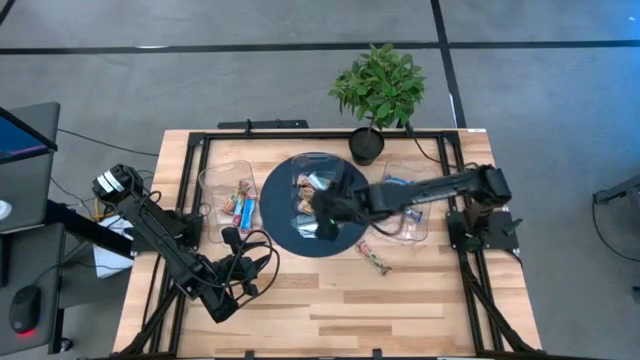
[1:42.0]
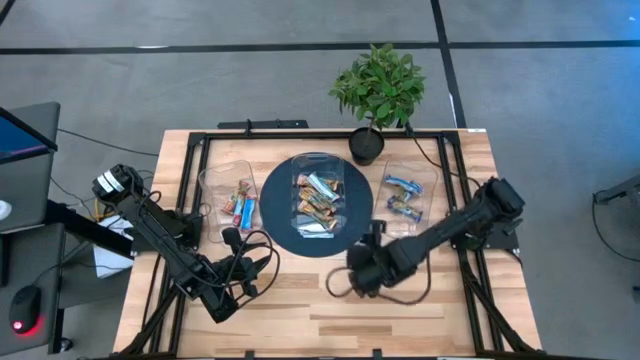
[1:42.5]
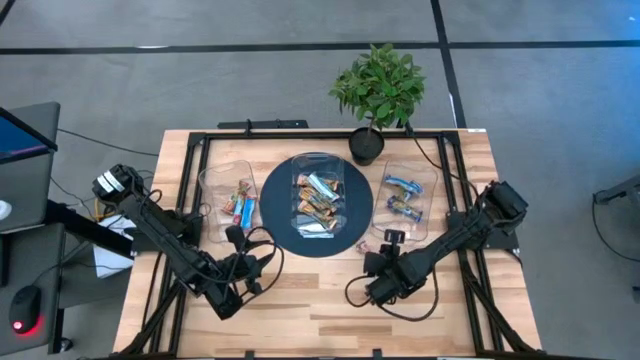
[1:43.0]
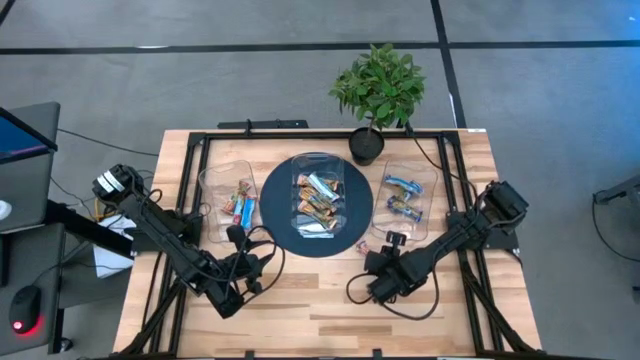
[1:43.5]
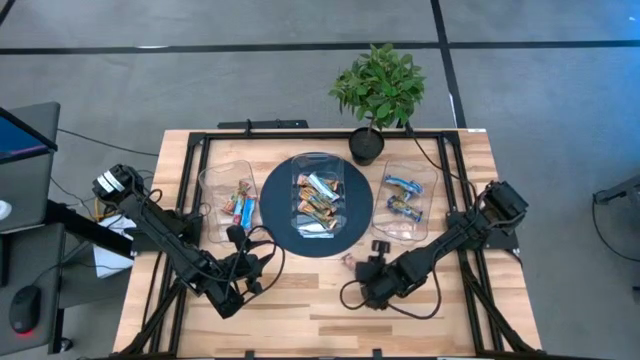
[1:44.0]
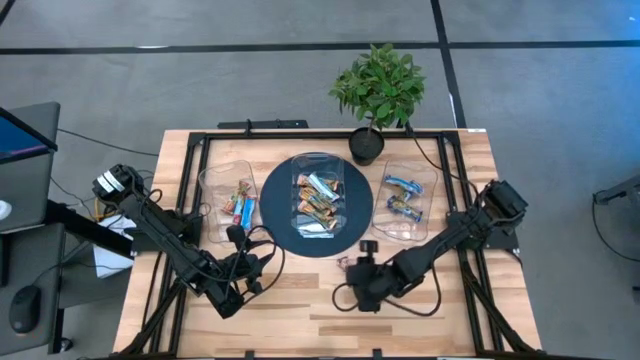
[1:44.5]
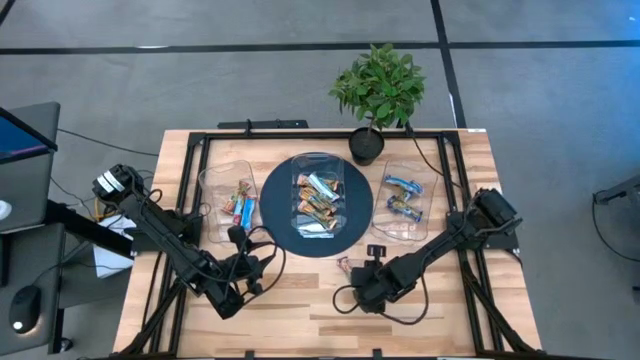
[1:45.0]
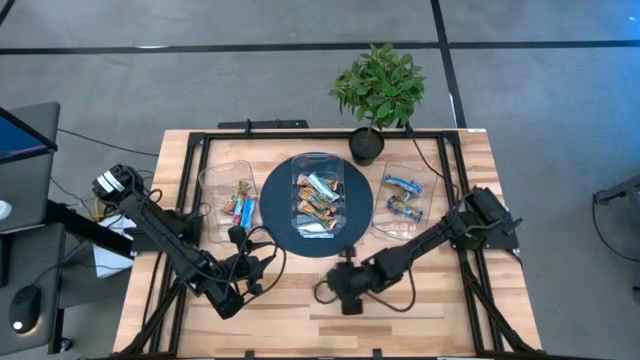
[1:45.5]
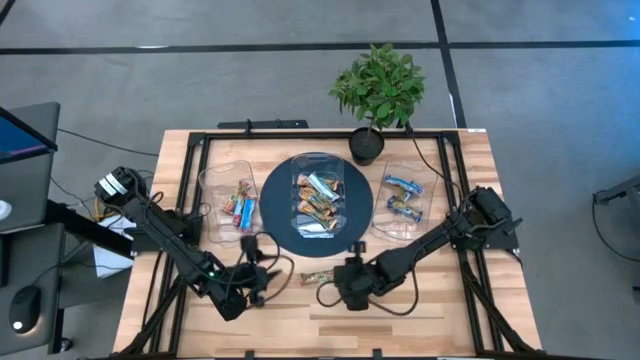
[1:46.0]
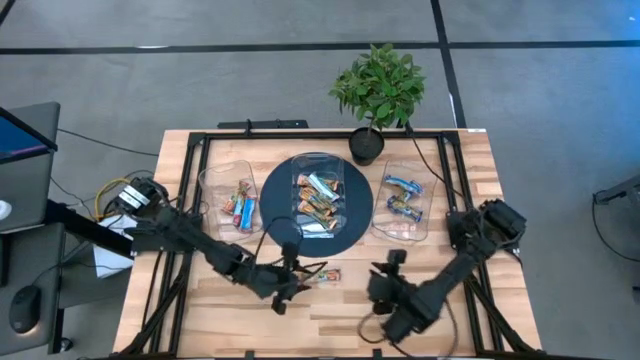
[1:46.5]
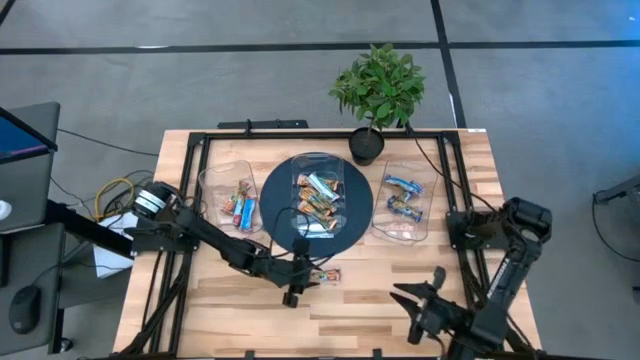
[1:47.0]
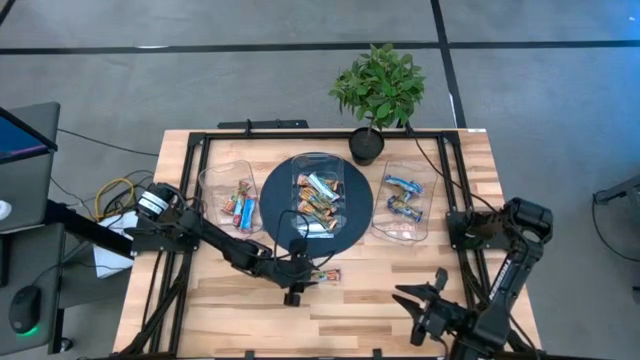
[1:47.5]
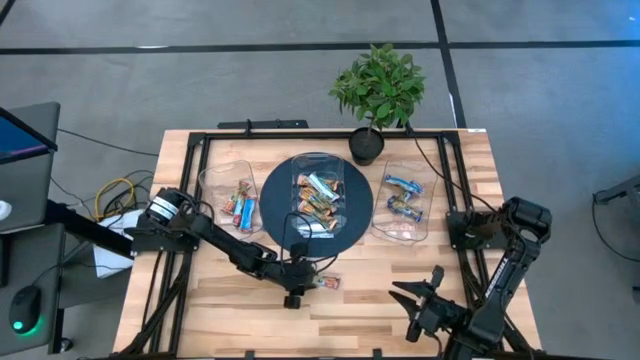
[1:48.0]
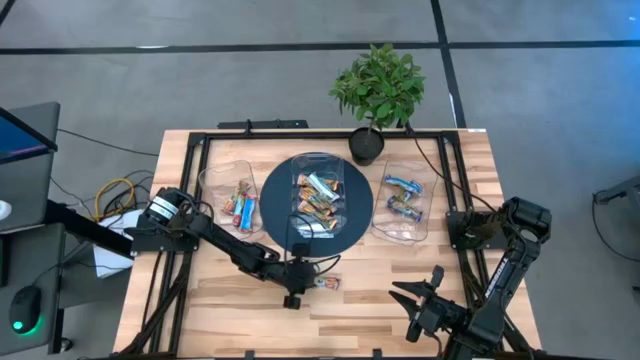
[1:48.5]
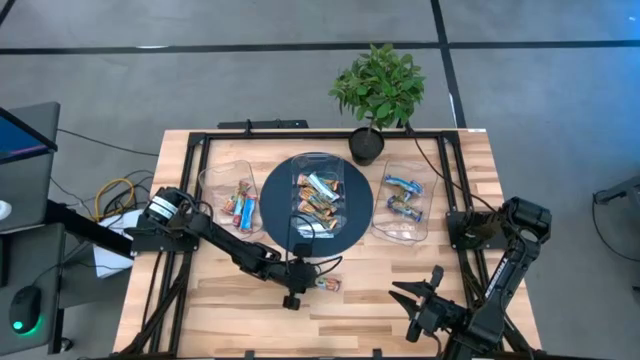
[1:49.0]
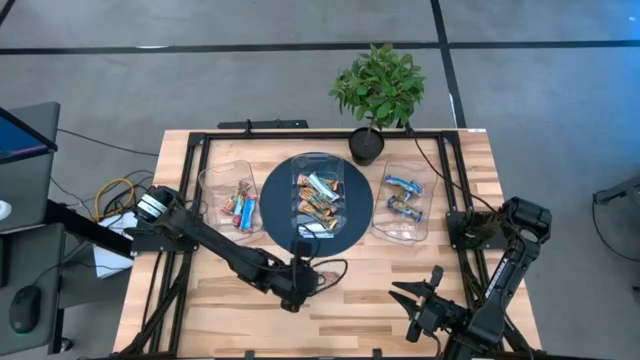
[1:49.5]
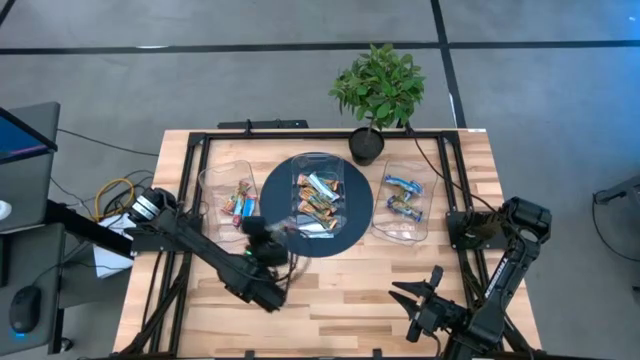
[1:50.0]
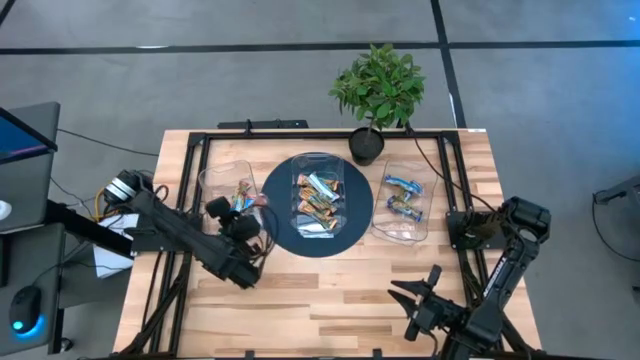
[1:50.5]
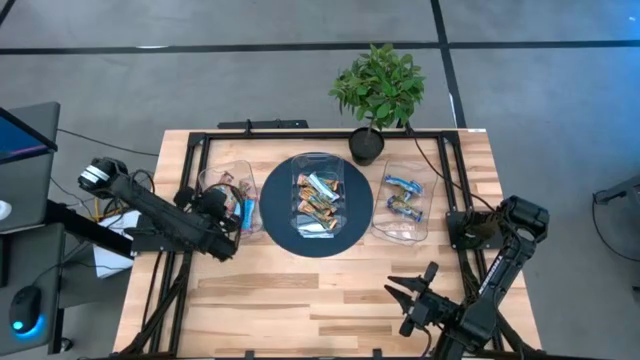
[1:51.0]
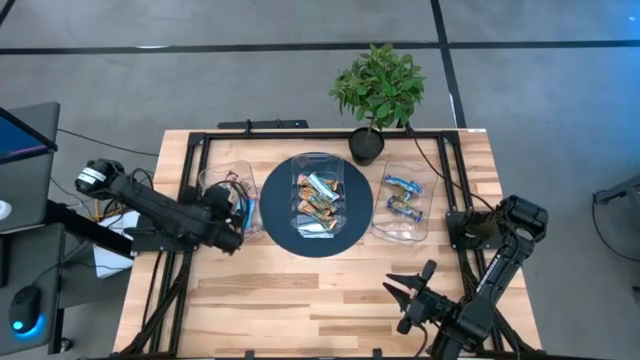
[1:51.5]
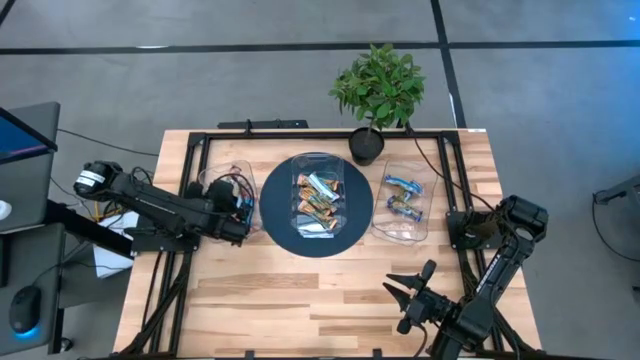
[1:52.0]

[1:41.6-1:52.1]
Task: Pick and place Granola Bars by type
Put the red granola bar into the left transparent bin

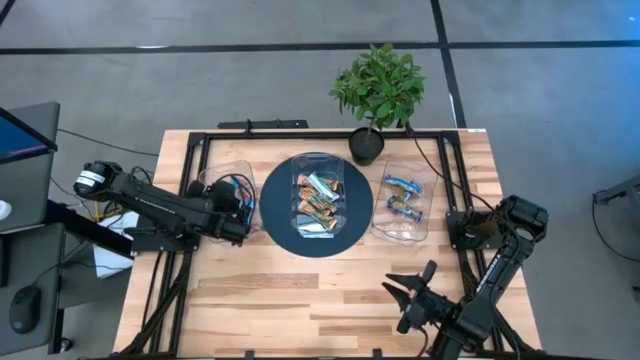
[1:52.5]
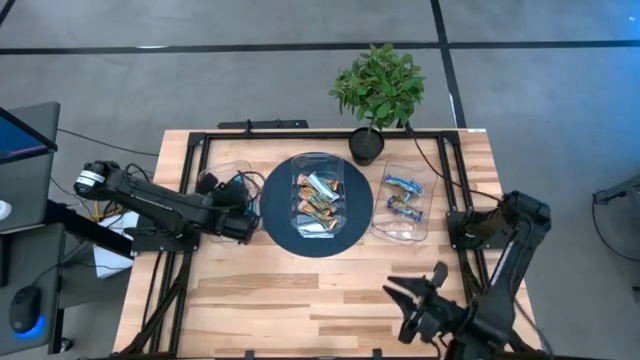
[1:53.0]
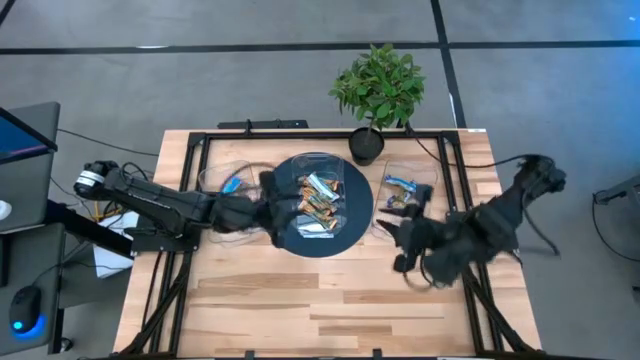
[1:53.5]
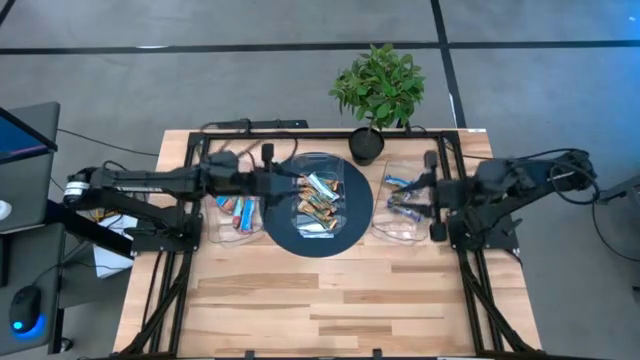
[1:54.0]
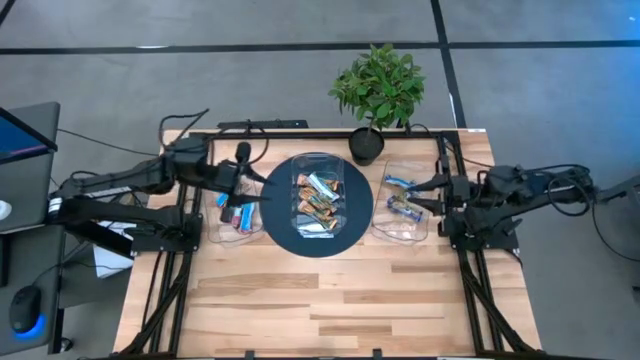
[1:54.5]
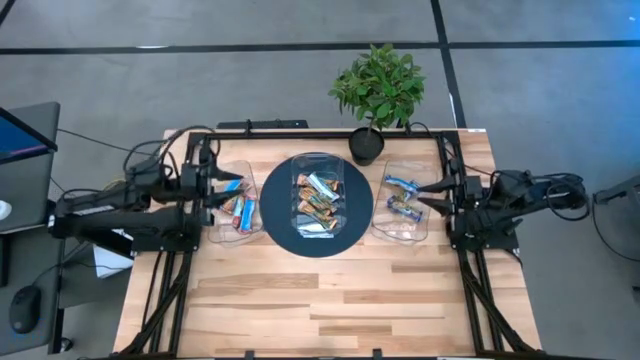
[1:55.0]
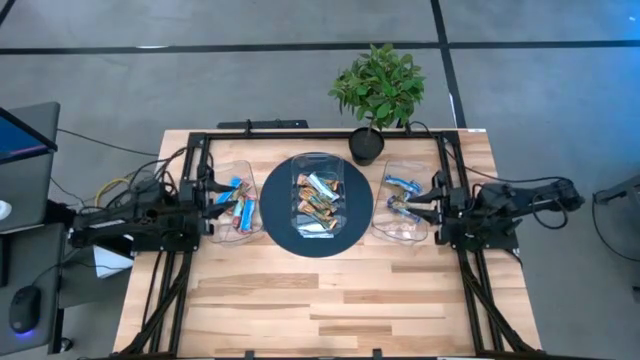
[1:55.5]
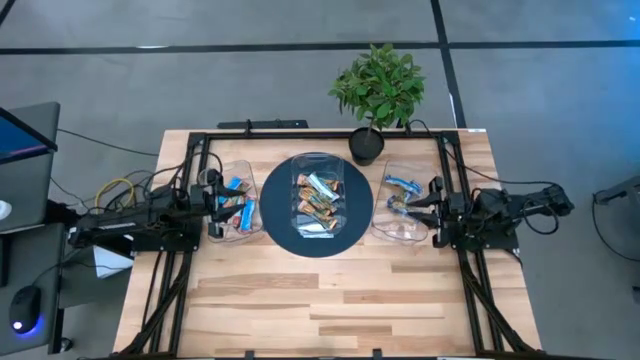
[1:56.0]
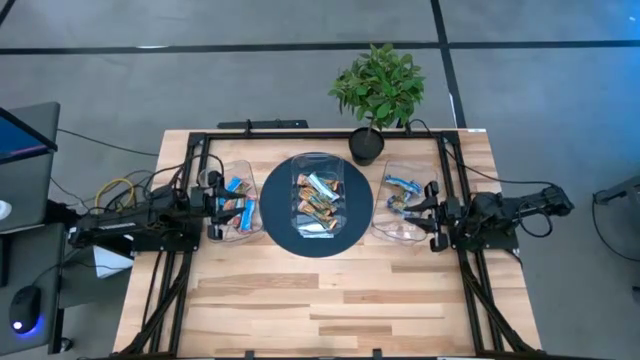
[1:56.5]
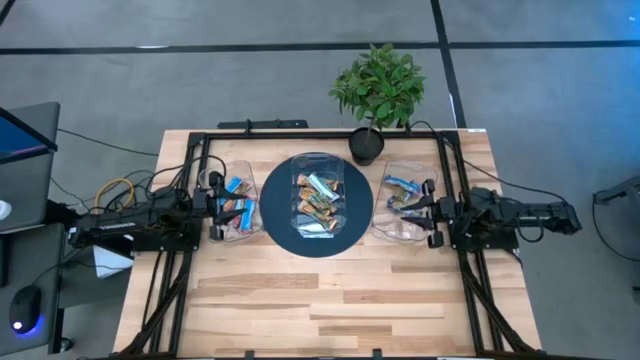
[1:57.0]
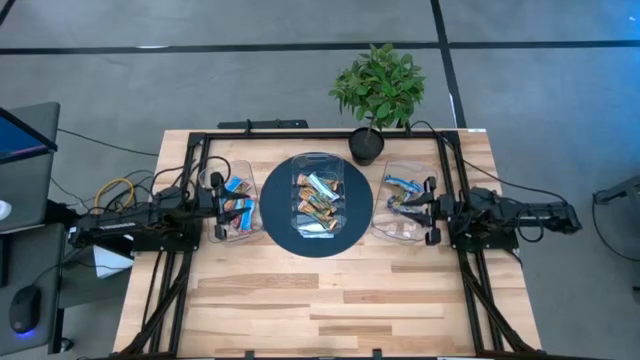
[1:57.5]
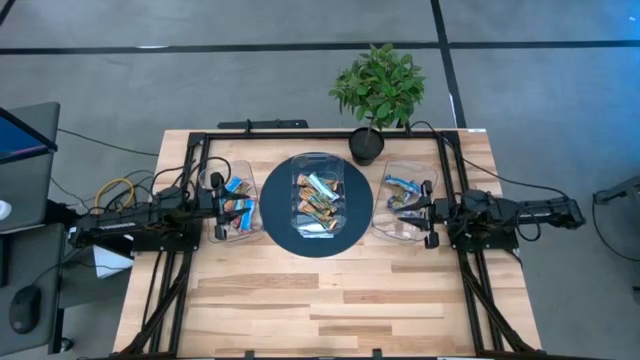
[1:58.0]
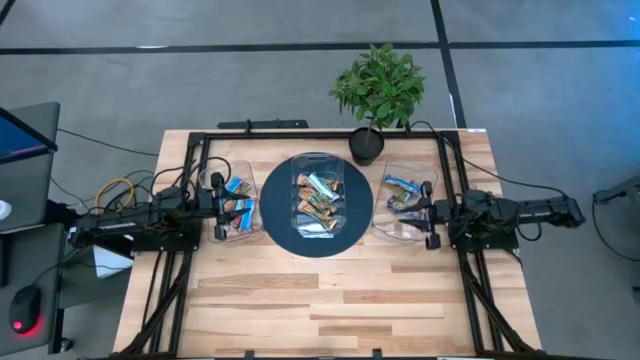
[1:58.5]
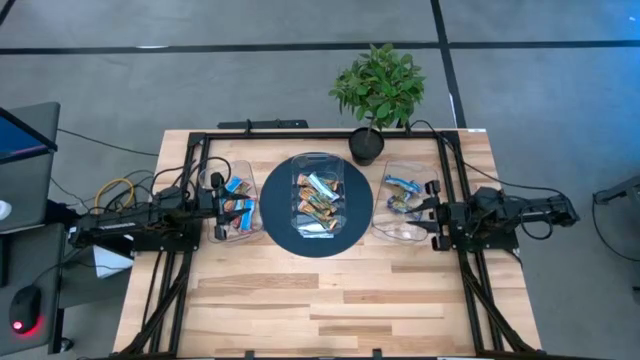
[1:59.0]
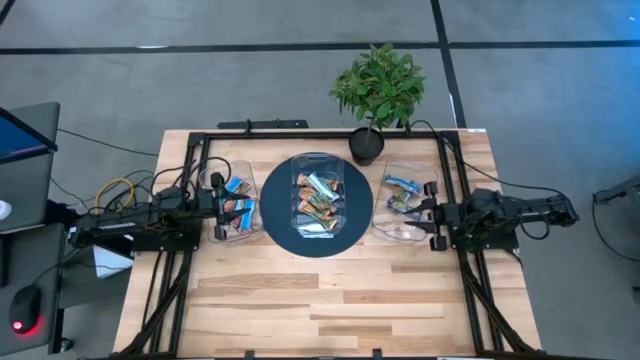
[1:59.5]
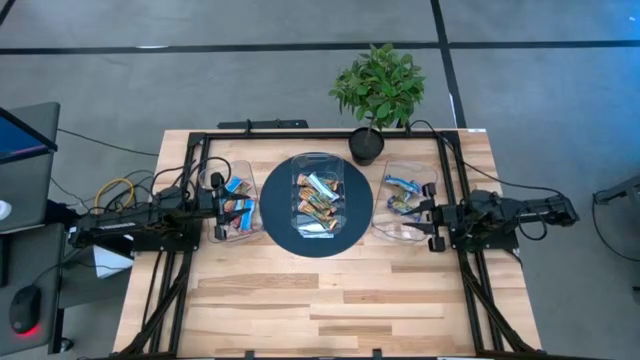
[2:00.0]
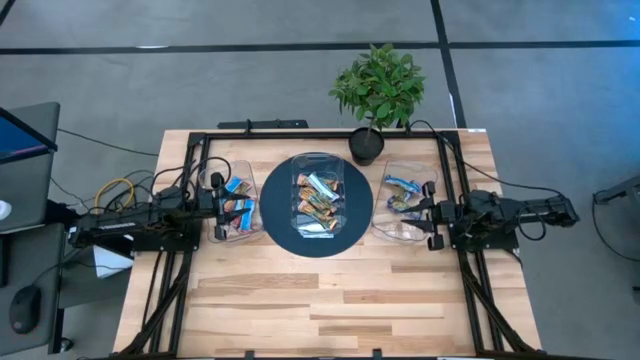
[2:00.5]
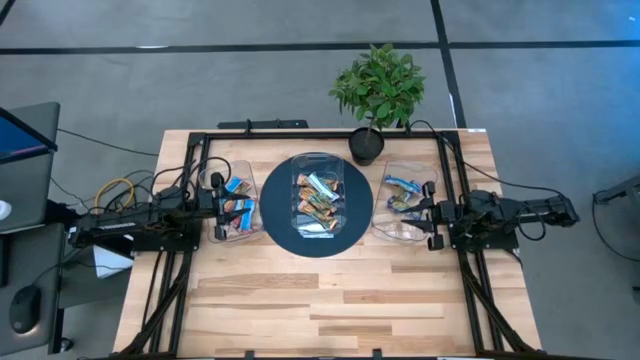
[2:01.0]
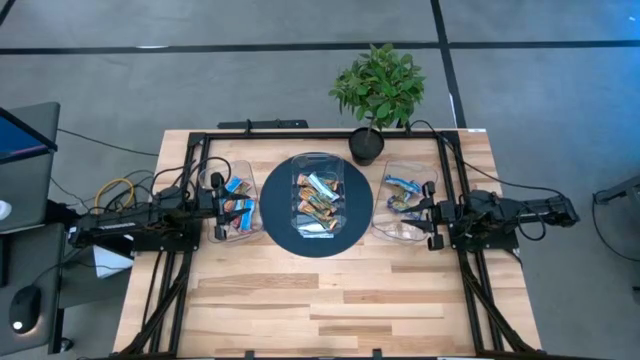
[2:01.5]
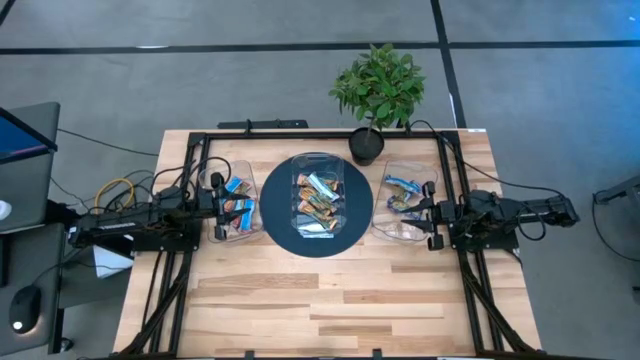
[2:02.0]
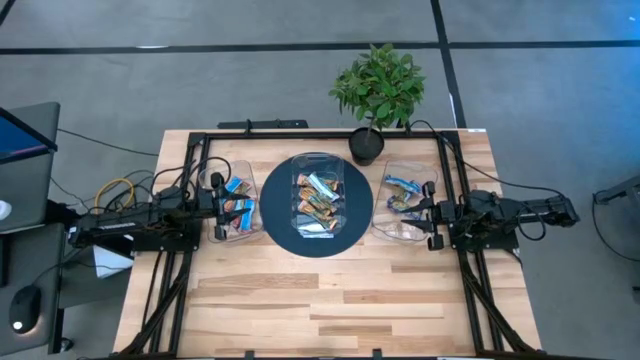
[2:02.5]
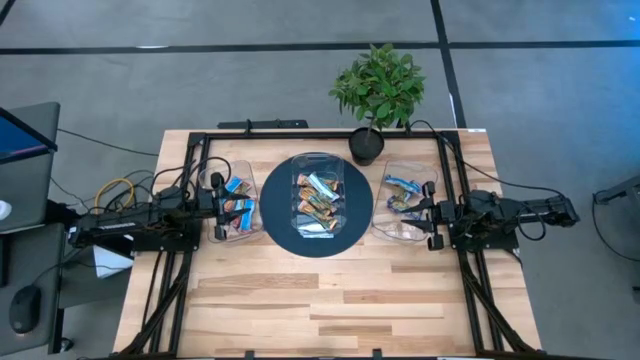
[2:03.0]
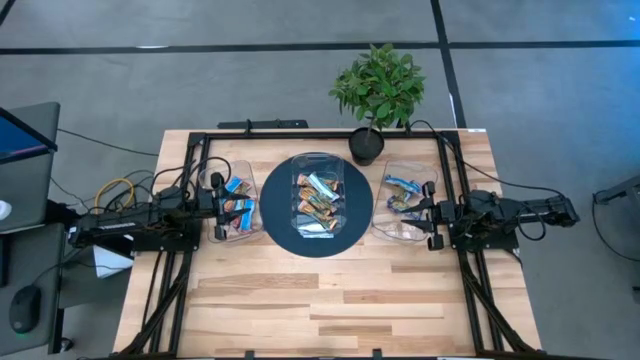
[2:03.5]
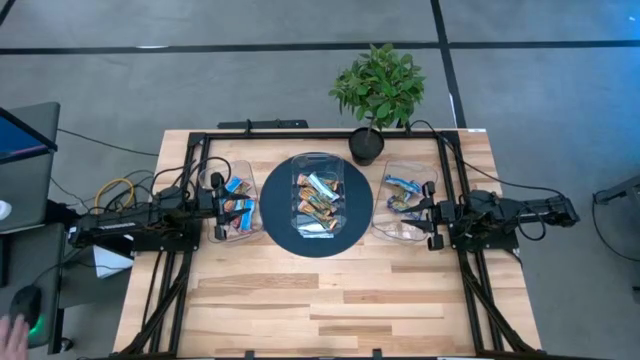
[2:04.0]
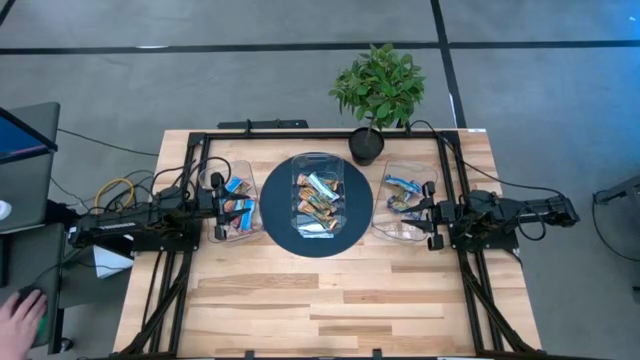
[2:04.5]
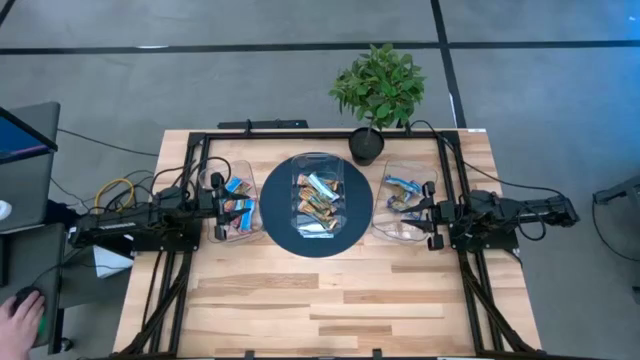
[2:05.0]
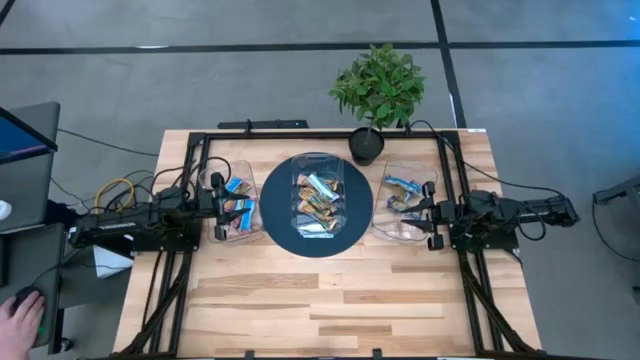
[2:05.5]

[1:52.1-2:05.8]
Return to Home Position
